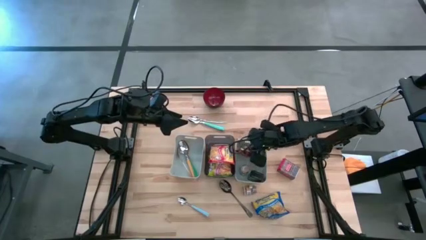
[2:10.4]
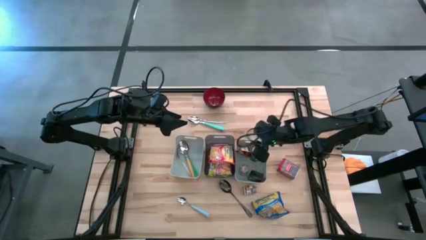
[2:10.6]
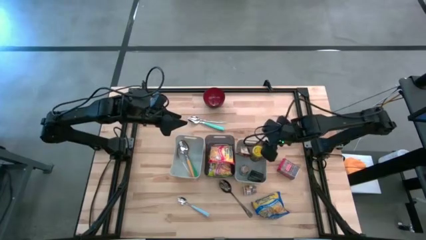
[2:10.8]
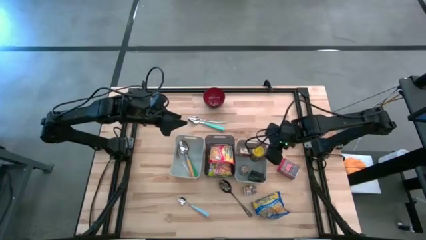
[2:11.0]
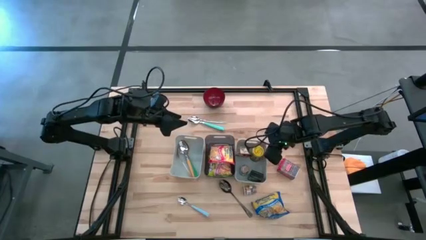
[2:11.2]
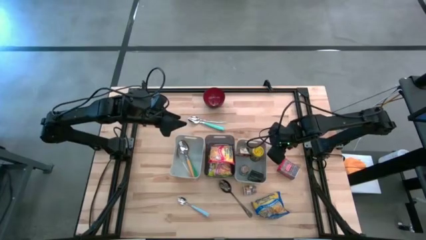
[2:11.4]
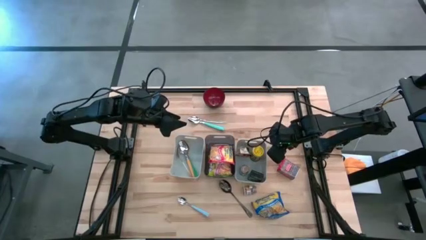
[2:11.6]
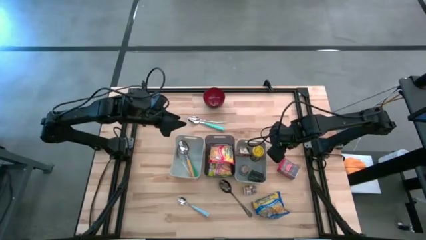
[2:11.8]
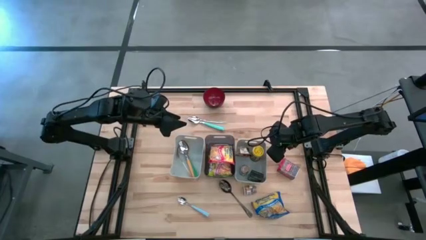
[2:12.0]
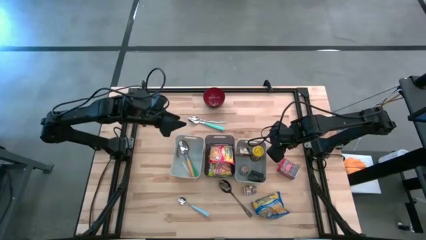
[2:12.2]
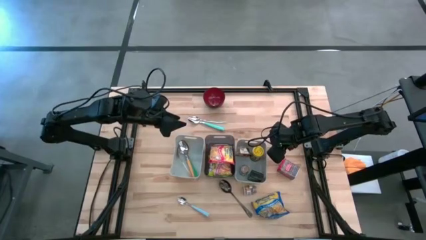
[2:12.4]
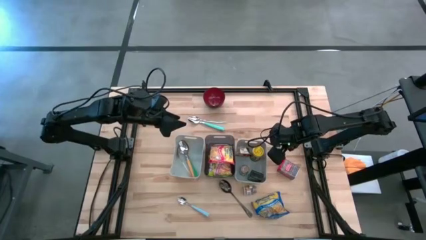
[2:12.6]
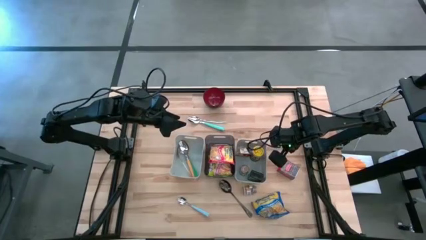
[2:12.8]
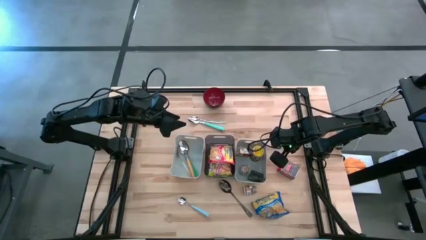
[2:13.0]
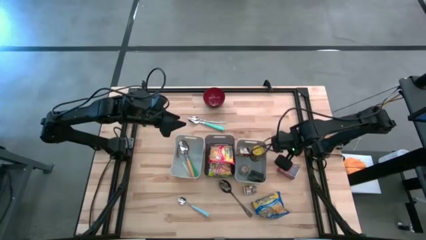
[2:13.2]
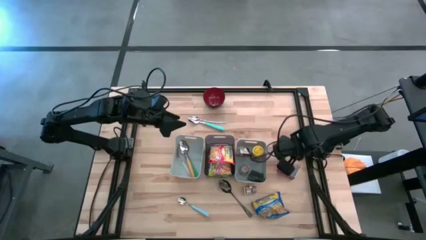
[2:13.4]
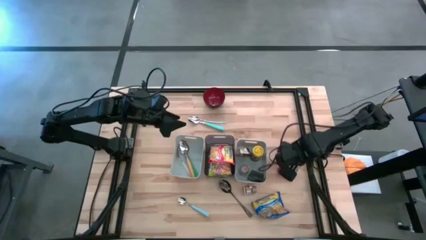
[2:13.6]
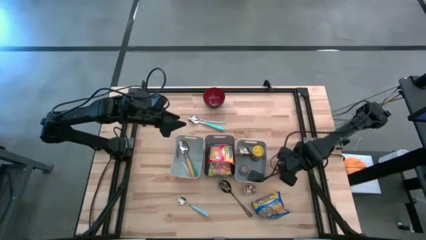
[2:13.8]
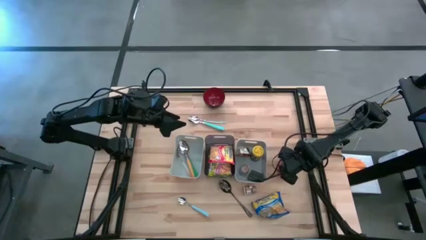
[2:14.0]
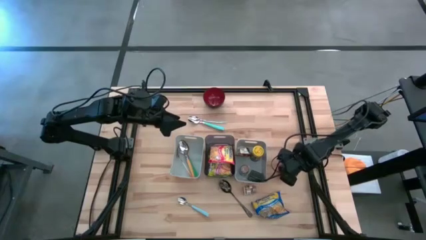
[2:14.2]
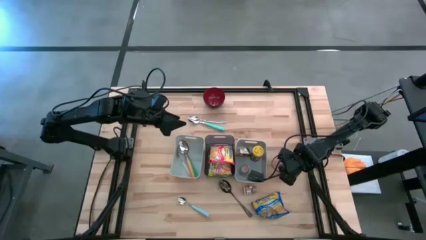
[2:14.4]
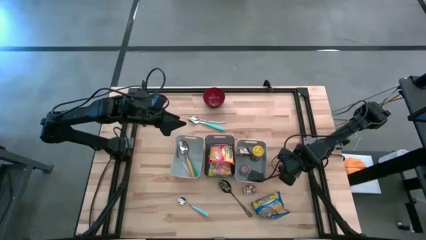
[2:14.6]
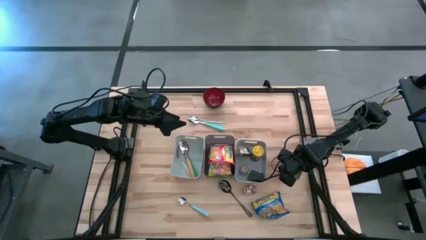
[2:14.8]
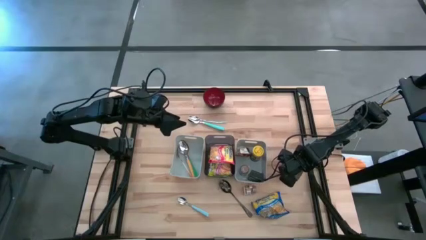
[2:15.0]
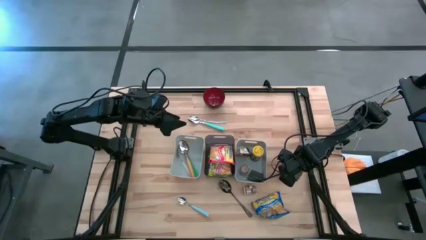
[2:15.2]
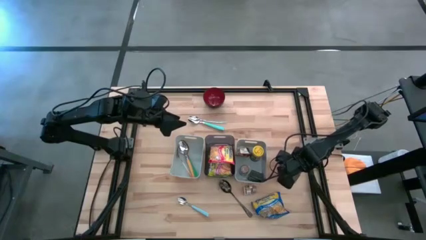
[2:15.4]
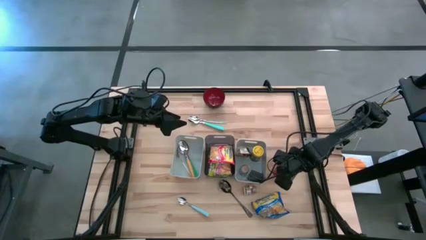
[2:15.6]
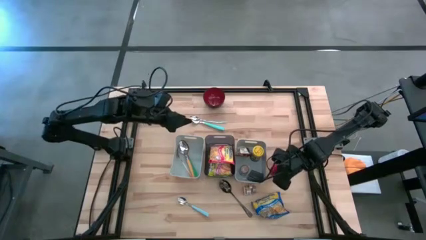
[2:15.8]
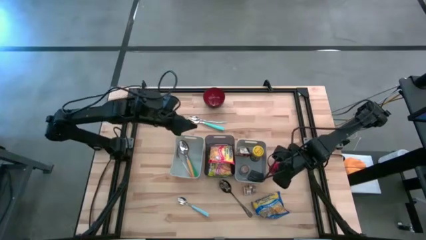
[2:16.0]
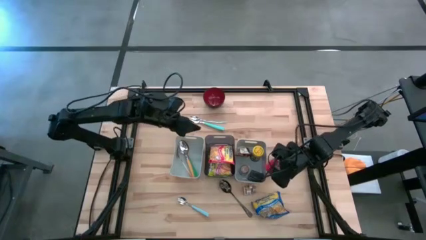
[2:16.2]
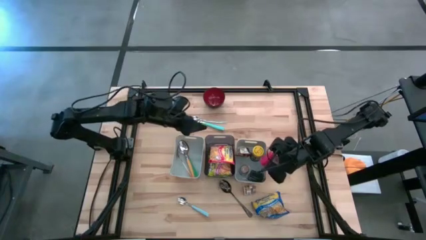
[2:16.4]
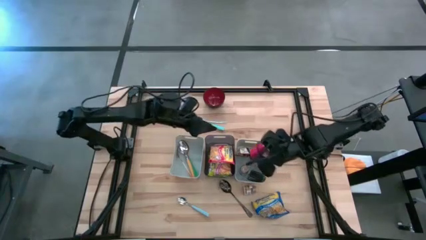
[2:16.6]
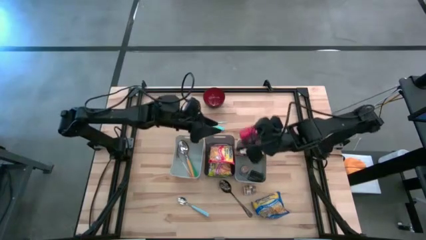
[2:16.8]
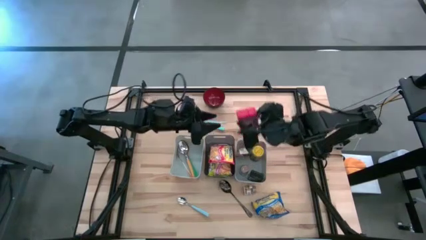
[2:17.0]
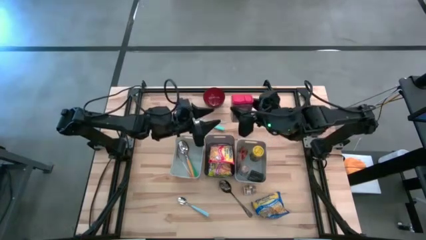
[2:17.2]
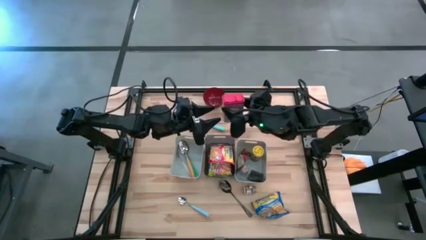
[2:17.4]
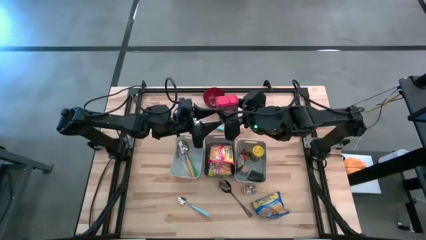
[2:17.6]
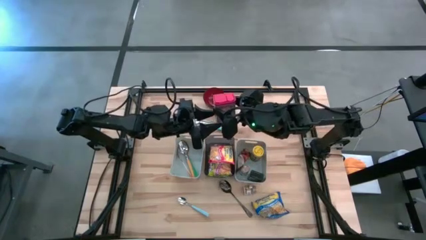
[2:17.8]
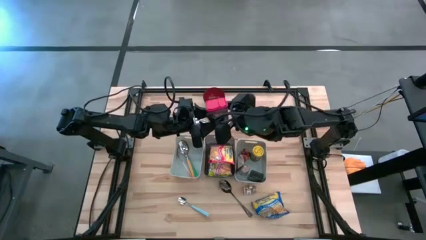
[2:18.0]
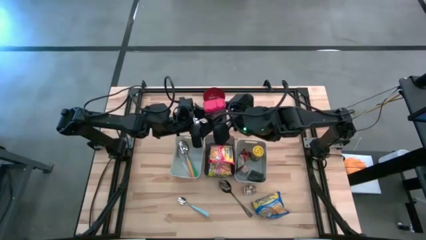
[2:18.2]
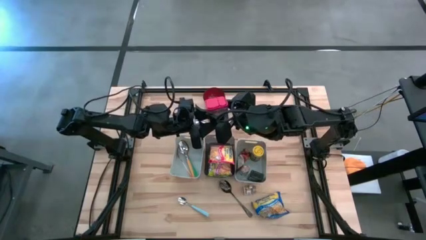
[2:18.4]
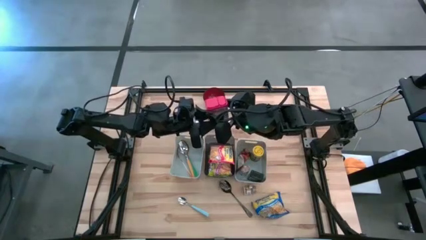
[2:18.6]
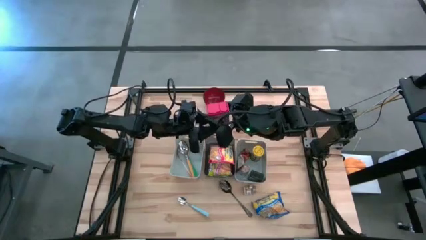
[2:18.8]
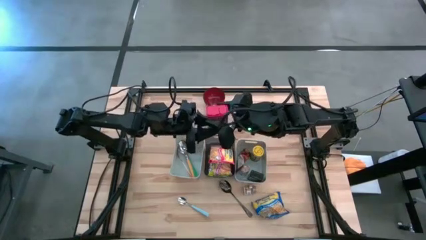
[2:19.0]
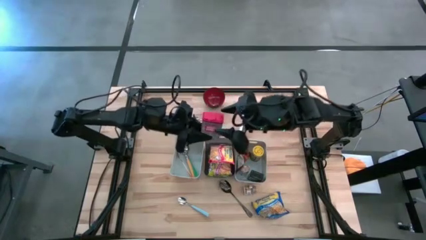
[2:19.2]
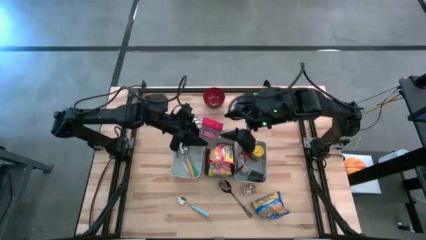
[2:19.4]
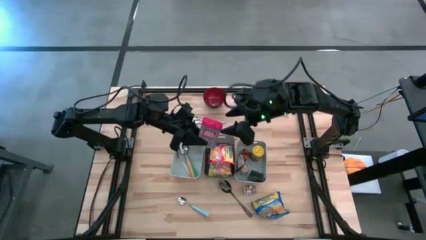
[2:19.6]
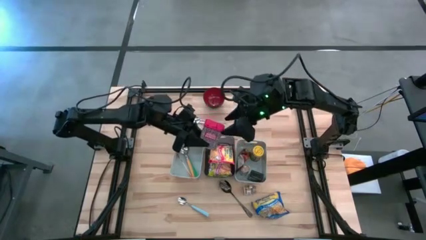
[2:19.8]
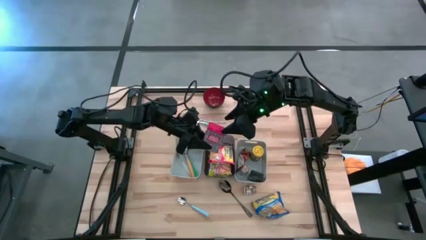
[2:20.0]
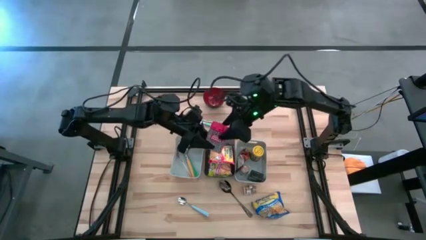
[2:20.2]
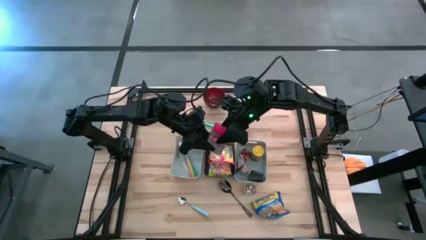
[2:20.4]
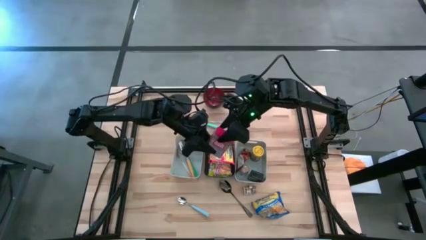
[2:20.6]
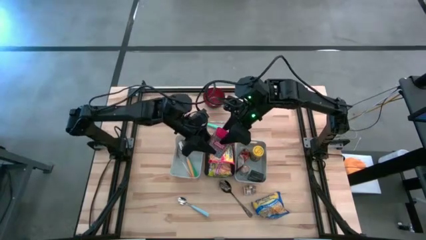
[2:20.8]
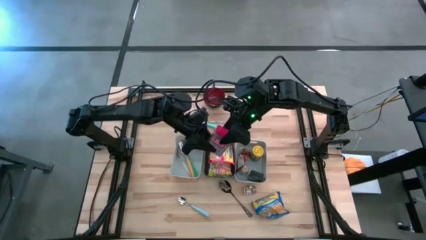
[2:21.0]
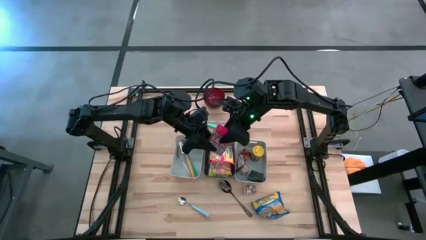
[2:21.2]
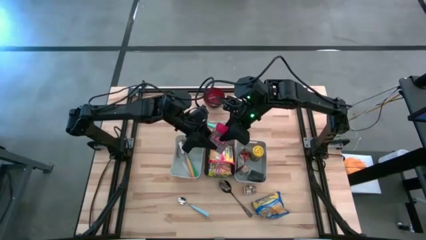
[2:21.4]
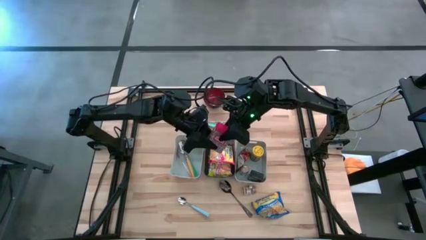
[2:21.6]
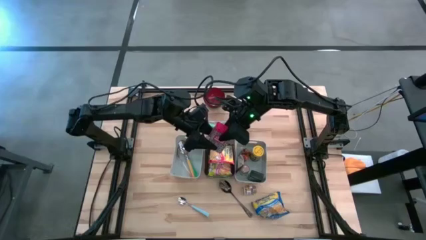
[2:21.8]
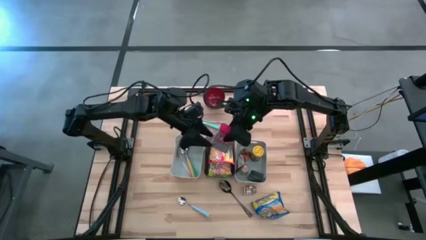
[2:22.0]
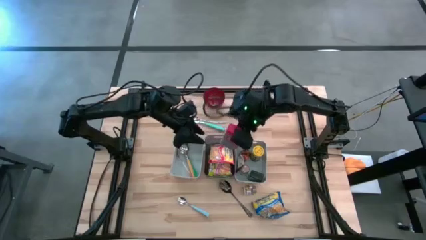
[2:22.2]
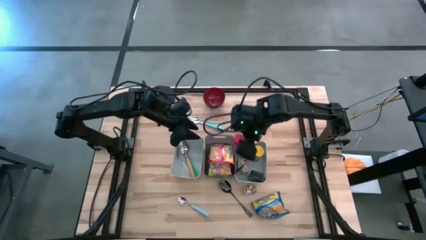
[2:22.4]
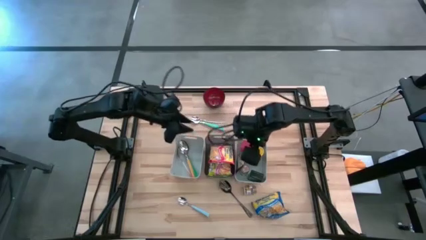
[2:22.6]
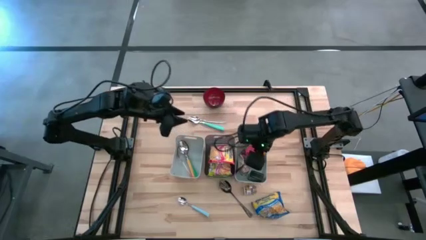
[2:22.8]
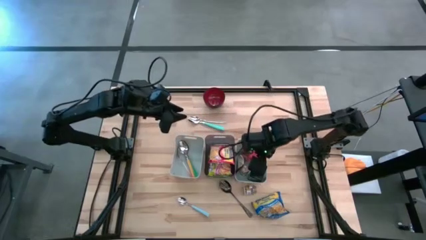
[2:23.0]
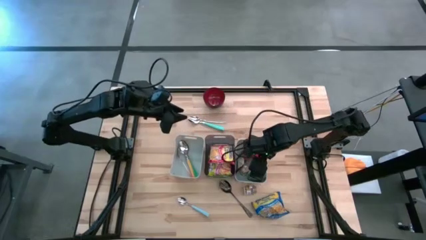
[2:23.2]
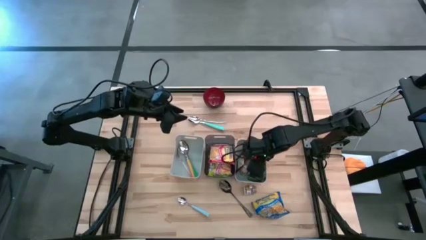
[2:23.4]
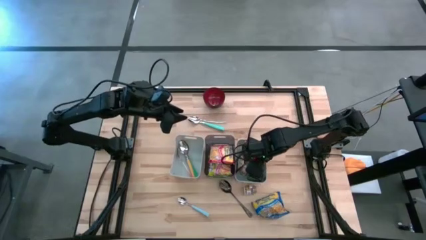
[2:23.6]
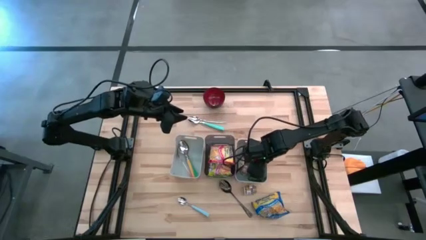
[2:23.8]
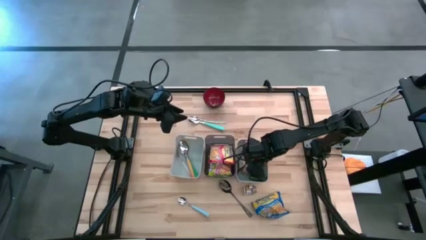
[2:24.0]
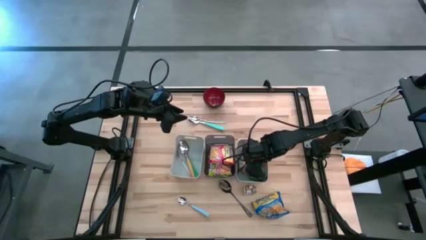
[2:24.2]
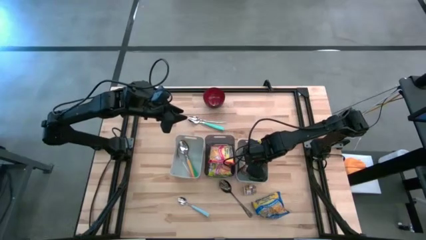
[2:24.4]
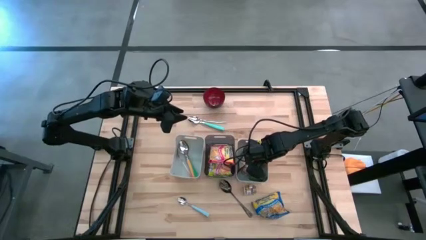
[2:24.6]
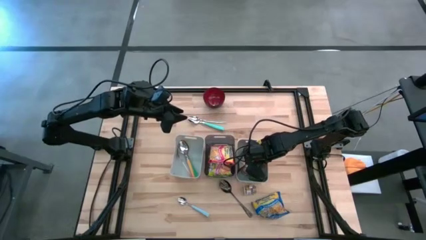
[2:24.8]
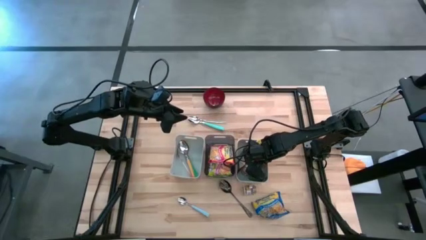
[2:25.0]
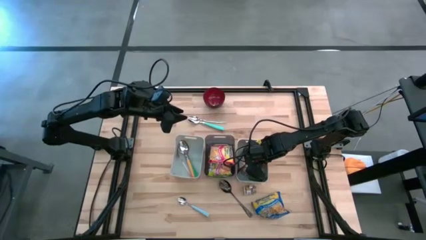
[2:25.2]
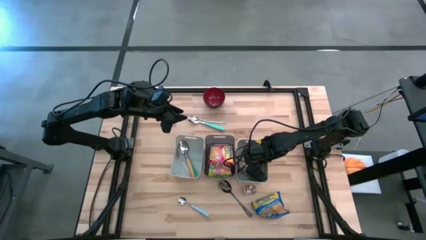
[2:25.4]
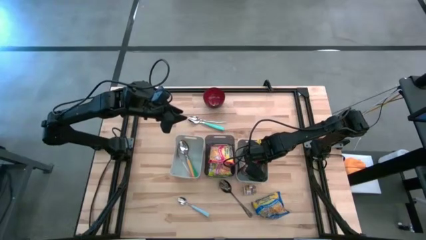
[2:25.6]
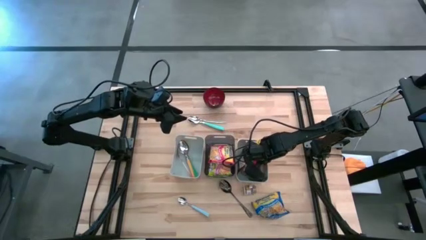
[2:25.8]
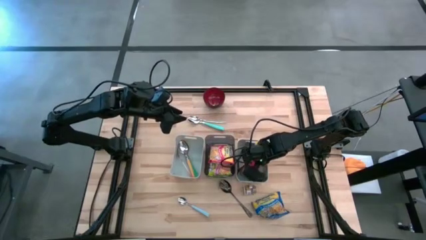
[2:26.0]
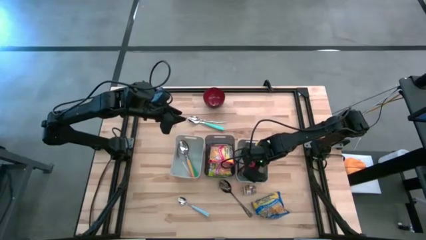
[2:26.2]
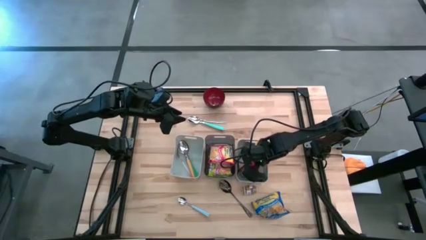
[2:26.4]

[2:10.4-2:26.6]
Put the red seasoning can into the right gray bin
